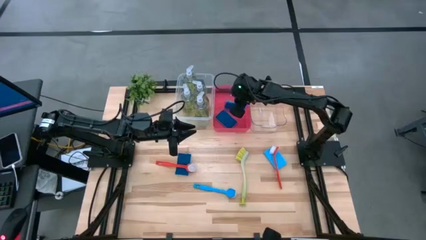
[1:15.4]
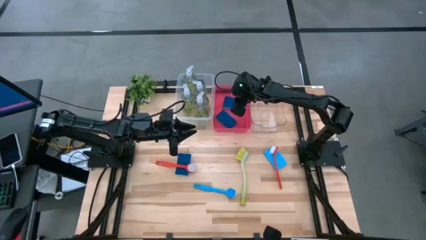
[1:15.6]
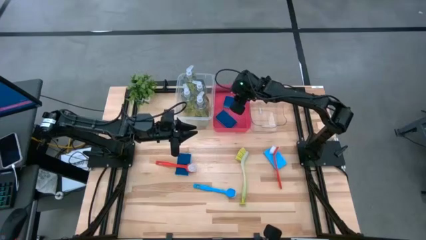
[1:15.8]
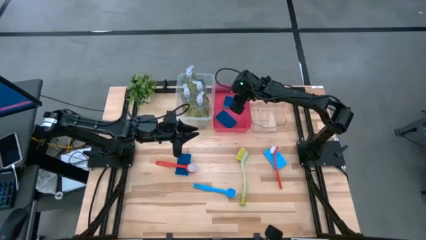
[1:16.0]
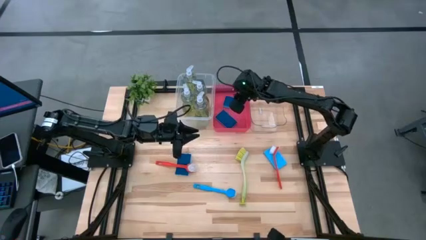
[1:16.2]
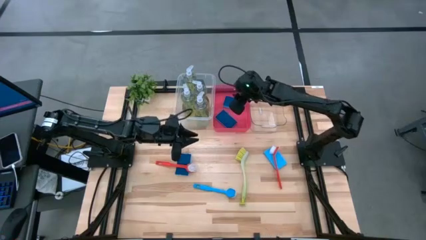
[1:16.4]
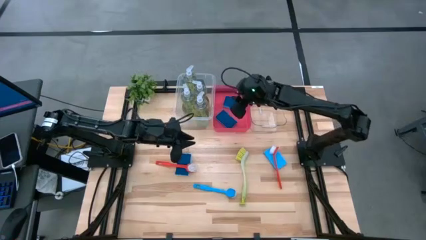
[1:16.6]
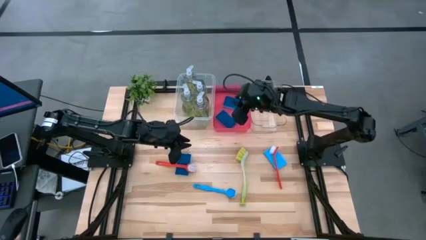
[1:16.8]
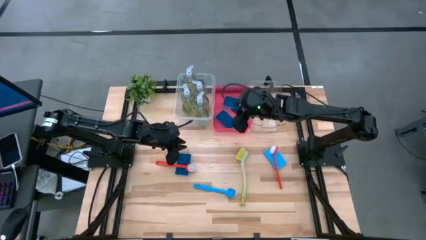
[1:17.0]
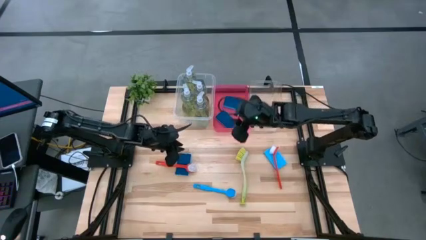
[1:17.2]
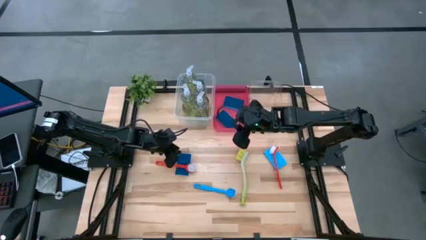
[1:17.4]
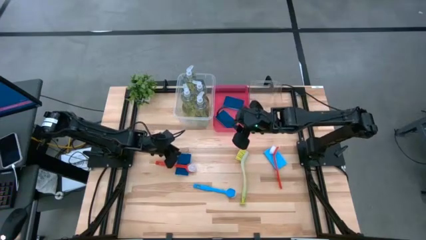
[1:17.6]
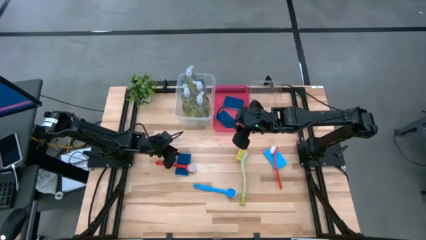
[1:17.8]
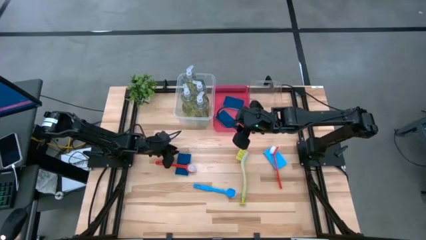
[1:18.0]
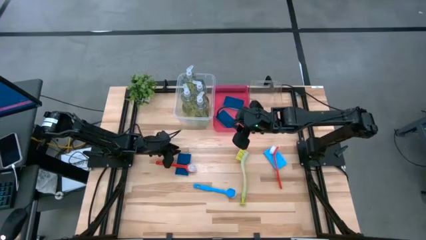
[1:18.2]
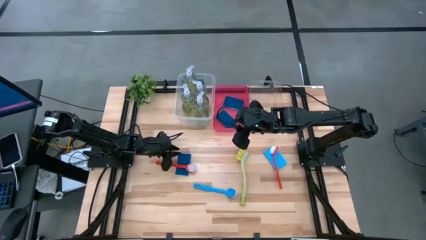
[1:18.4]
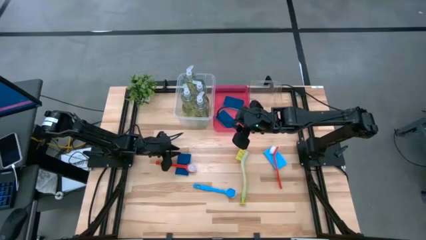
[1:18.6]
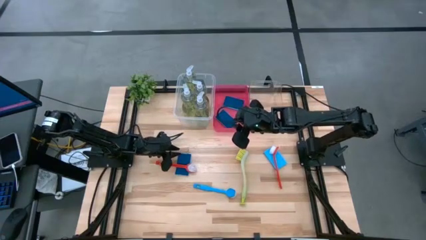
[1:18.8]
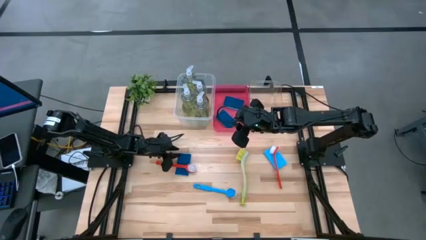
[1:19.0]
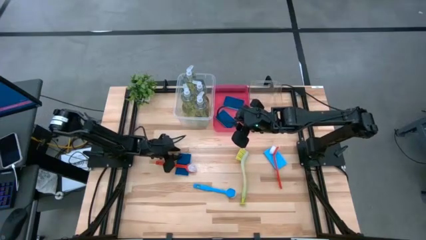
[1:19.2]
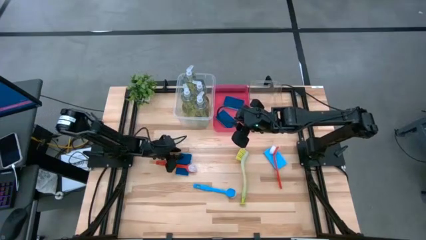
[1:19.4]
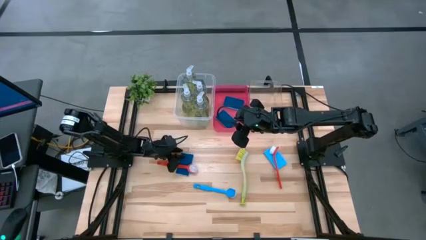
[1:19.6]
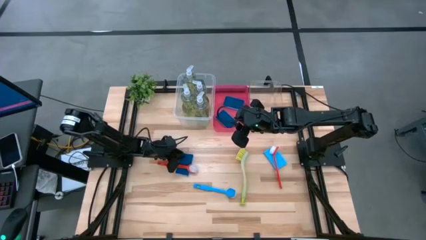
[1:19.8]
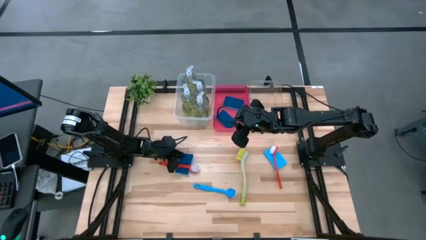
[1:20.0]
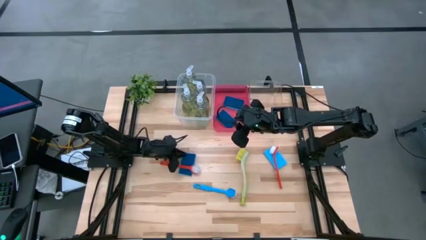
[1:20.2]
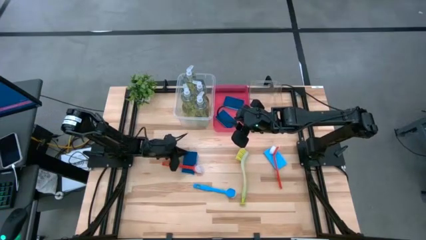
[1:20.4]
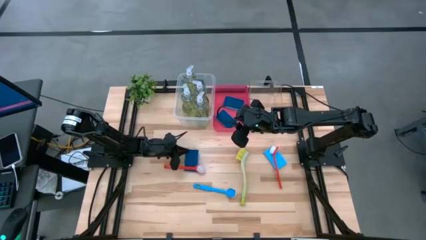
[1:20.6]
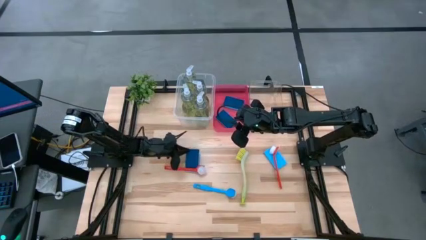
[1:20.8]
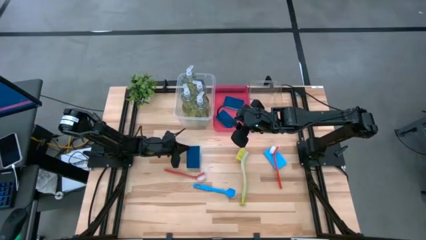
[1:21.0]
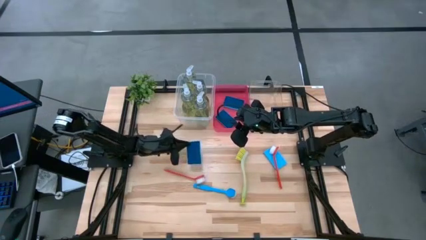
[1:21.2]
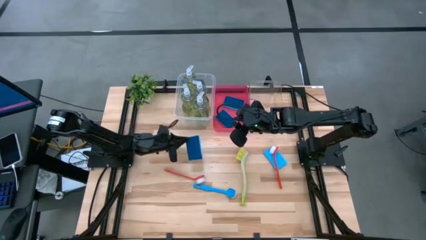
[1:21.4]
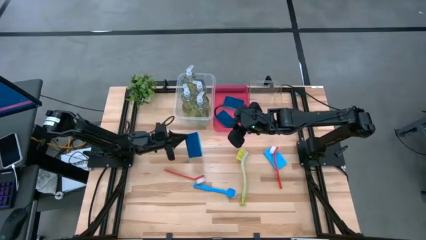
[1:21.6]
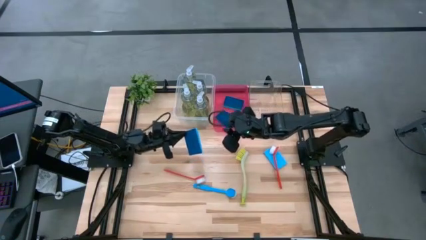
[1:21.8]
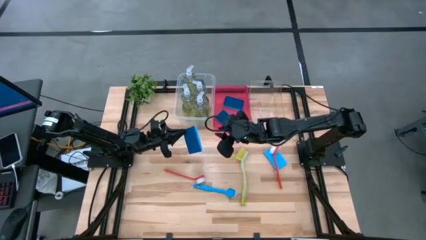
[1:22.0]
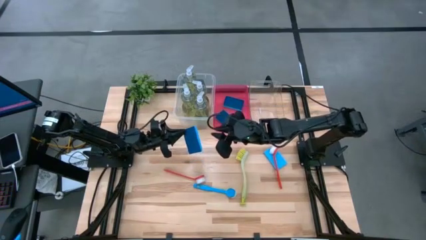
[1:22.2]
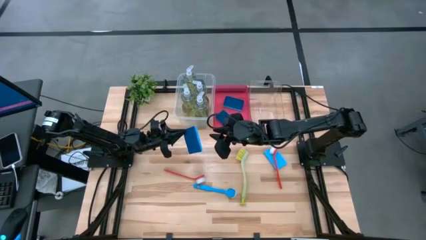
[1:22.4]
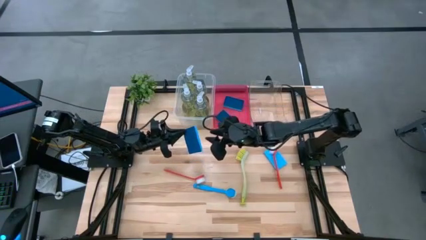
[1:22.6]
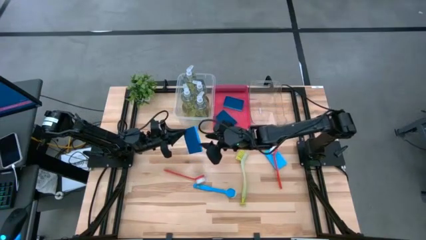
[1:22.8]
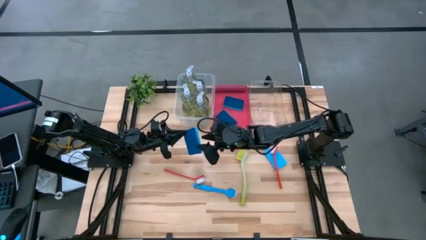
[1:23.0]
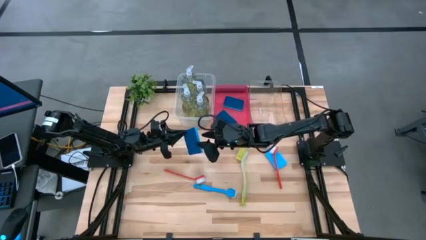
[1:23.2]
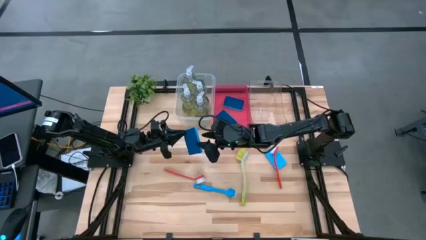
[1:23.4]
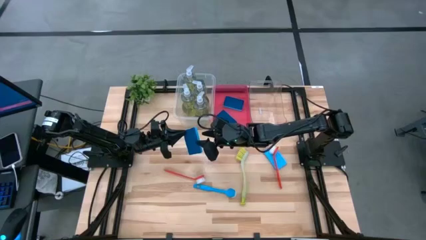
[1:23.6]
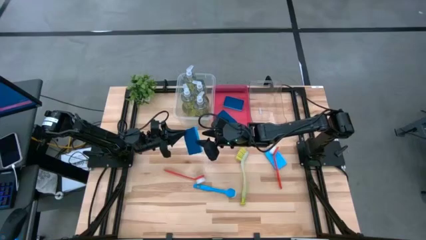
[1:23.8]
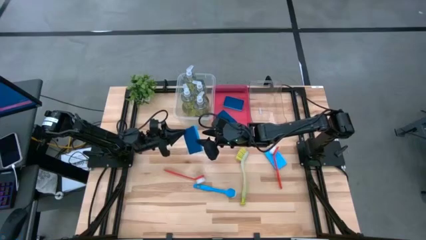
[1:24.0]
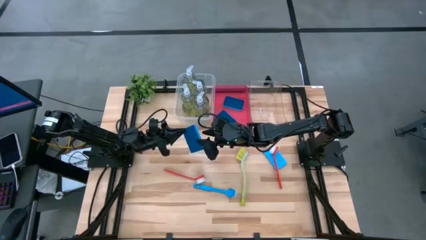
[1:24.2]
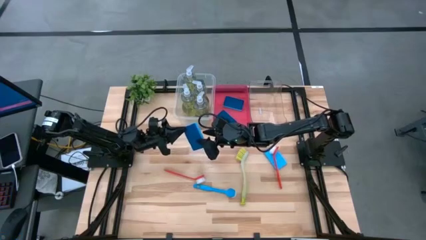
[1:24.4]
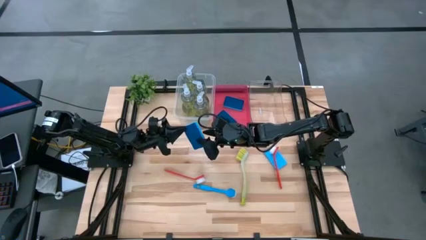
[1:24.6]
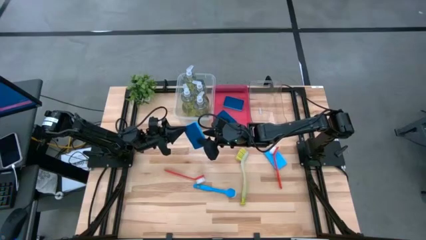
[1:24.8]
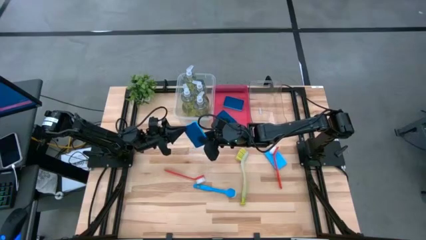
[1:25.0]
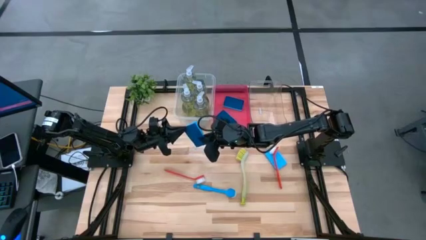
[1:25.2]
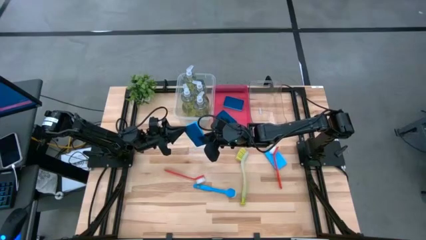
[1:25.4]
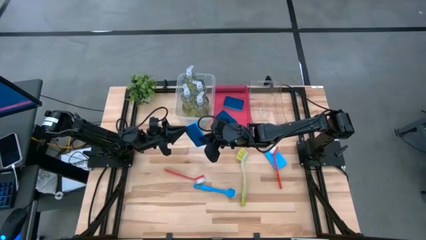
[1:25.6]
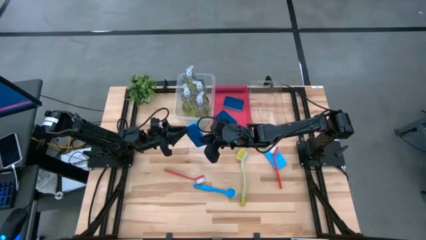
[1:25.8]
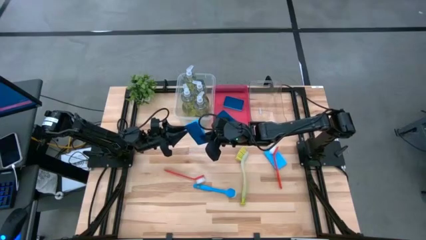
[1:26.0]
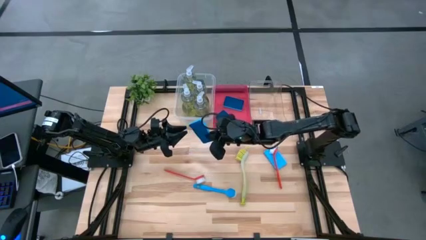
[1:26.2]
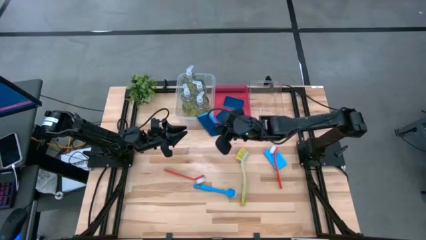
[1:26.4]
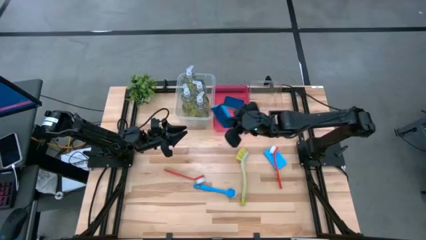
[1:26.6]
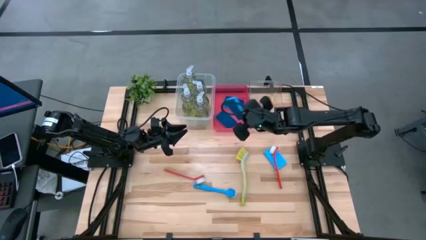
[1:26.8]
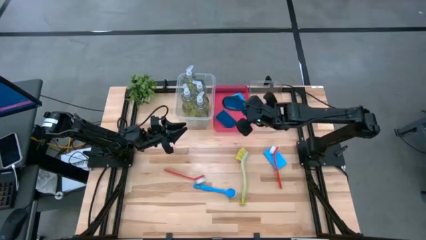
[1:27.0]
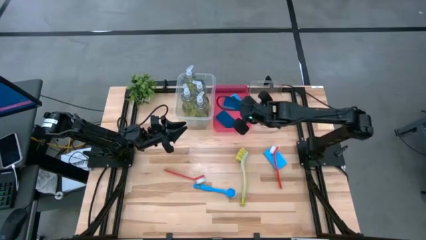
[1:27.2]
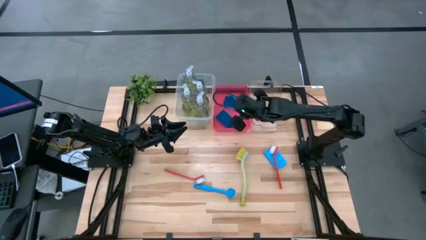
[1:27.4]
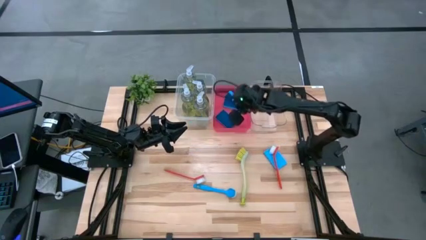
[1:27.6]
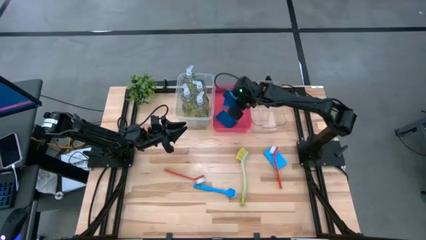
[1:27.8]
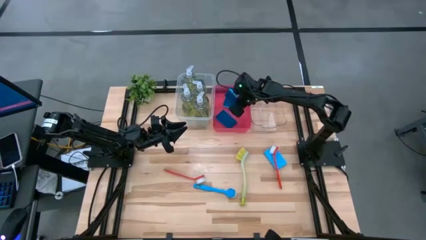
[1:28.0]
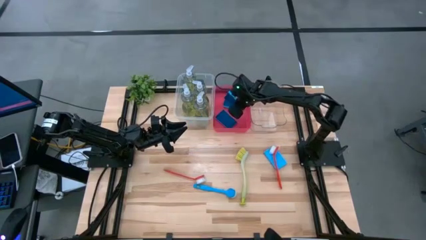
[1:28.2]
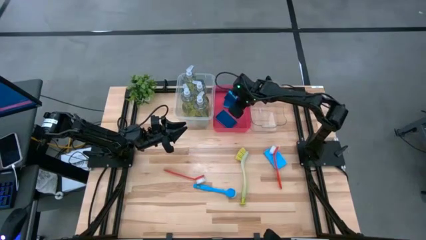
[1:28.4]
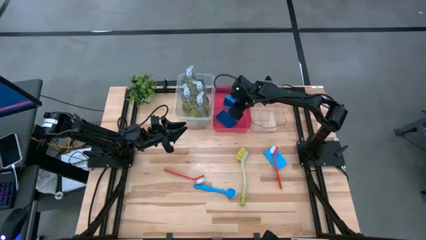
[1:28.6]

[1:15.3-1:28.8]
Task: Pick & Place Kitchen Sink Supplies
Put the blue sponge into the red bin

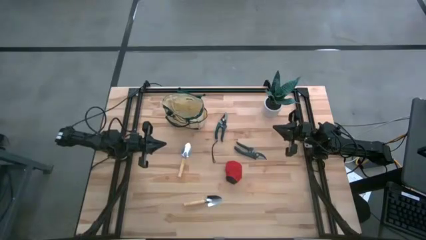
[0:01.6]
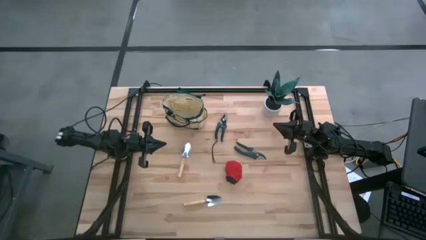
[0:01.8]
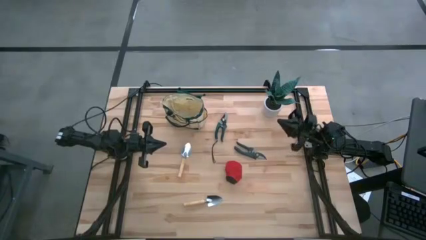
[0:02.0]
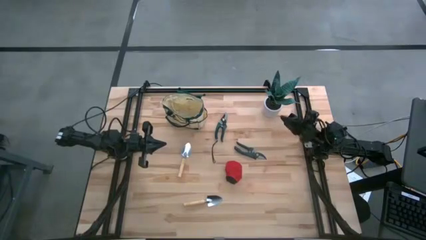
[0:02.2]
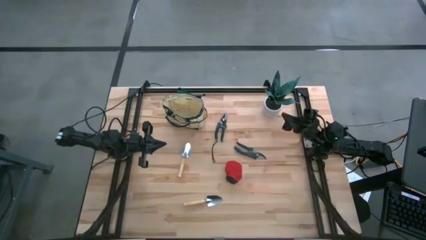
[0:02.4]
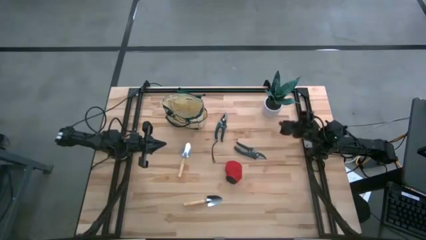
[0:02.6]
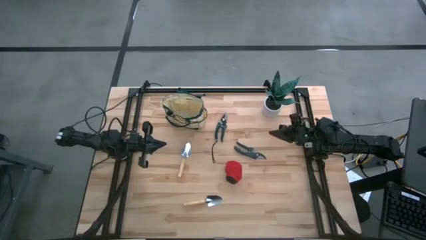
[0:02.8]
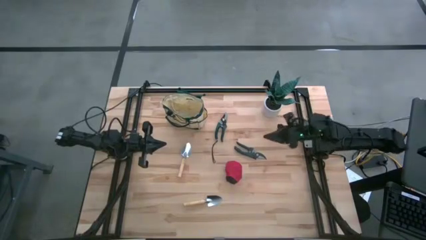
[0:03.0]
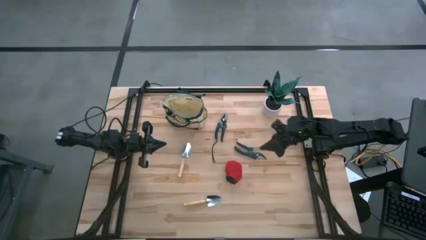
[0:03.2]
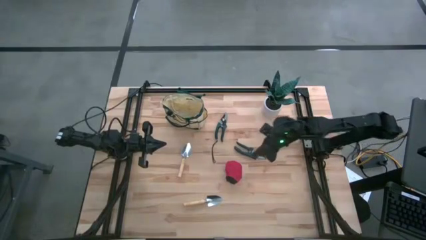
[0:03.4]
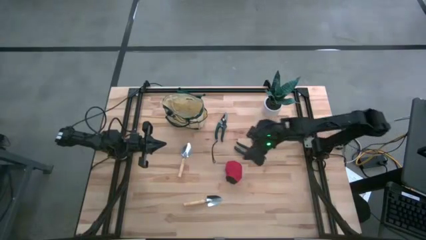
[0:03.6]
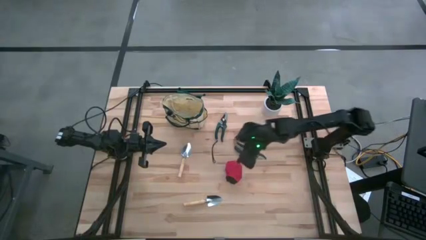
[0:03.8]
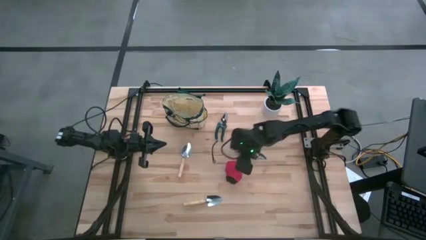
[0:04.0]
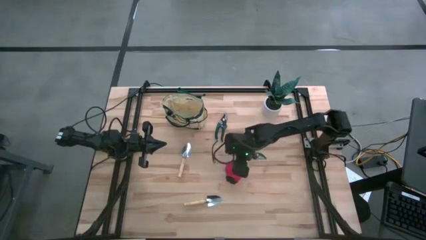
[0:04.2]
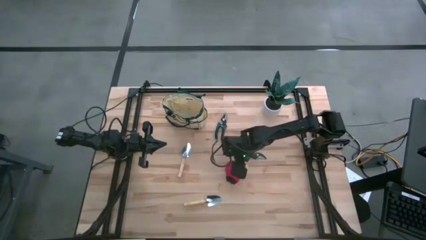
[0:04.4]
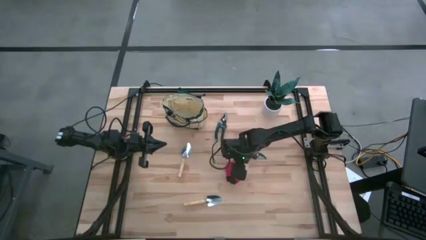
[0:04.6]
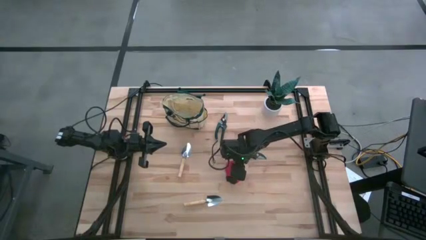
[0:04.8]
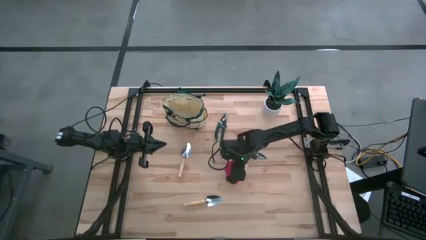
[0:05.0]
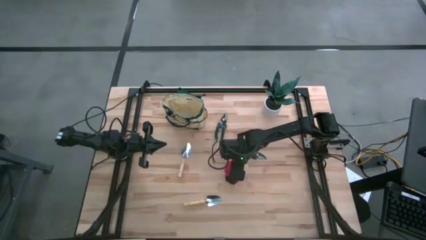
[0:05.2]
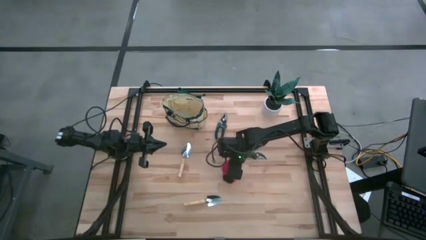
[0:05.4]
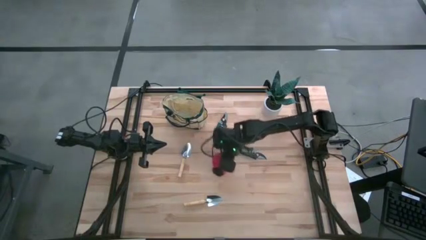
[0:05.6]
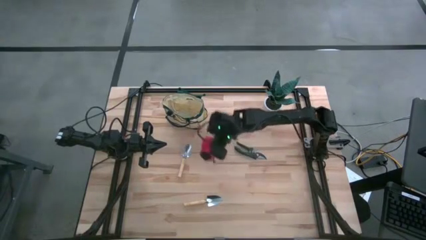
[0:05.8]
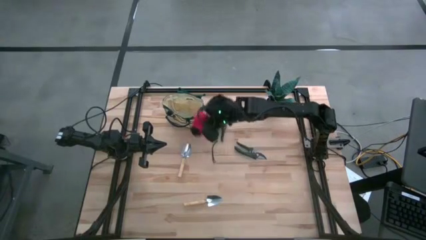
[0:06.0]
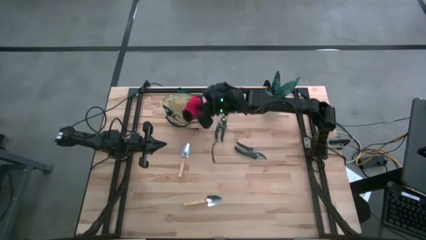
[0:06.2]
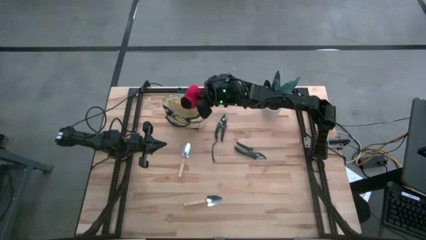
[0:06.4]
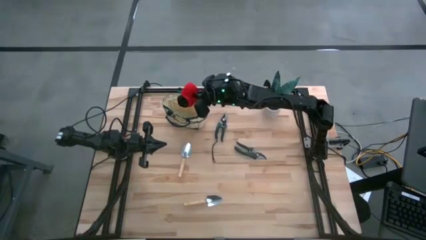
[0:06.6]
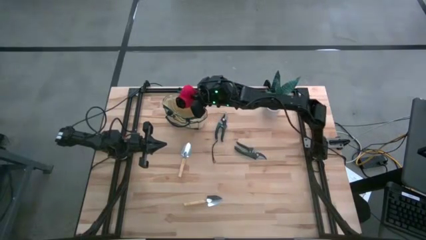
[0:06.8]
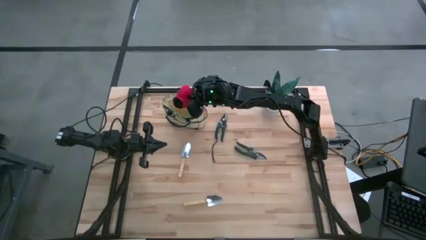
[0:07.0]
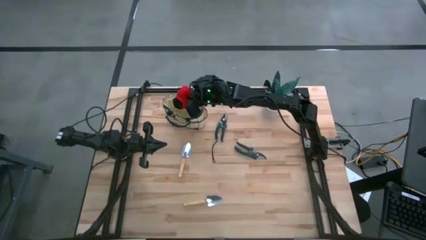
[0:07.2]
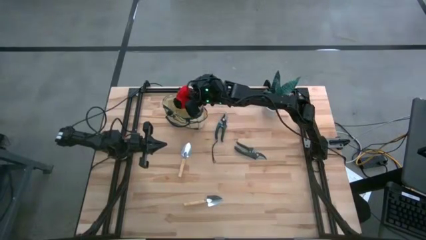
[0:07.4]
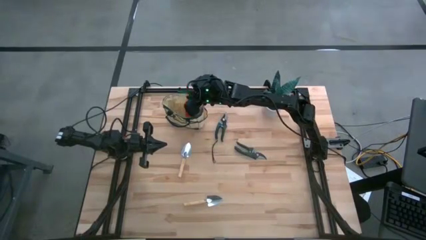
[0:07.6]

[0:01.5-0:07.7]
Task: Pick & Place Garden tools in Gardening bag
Put the gloves into the gardening bag
